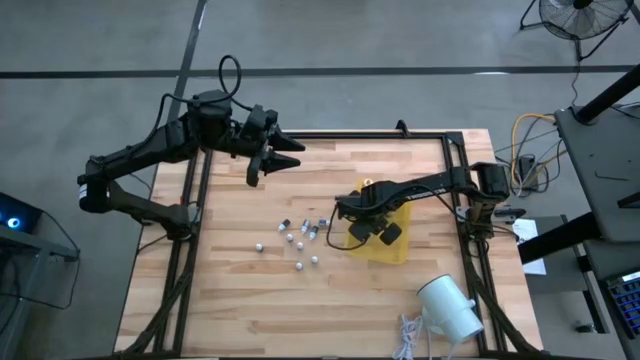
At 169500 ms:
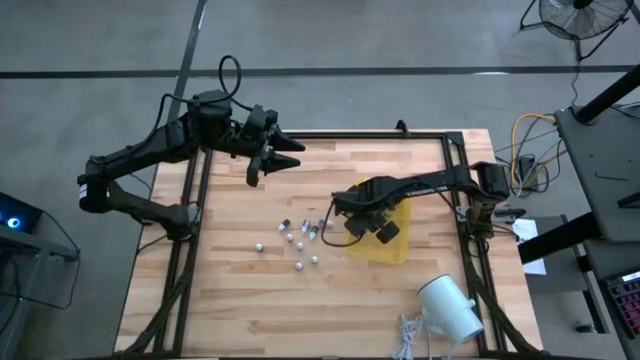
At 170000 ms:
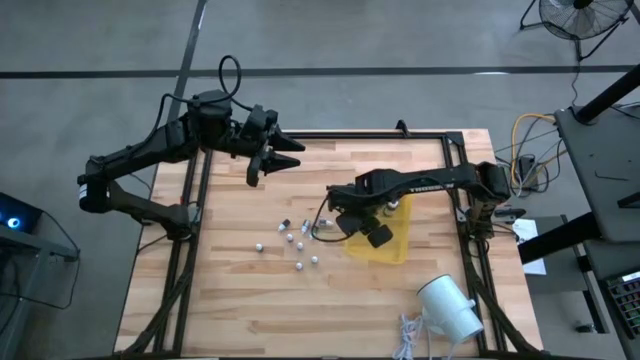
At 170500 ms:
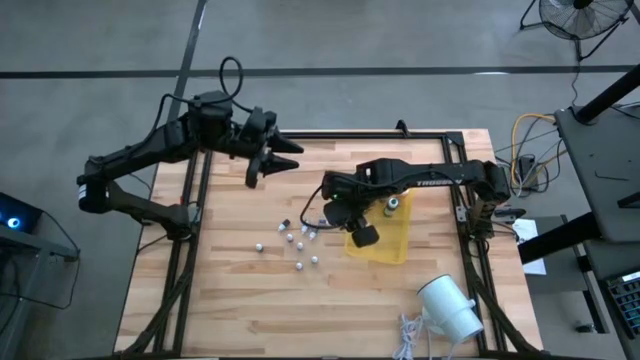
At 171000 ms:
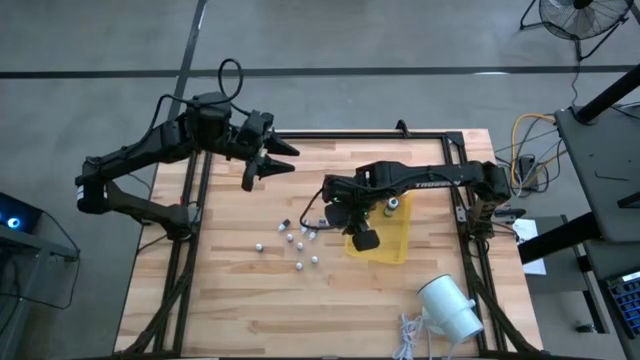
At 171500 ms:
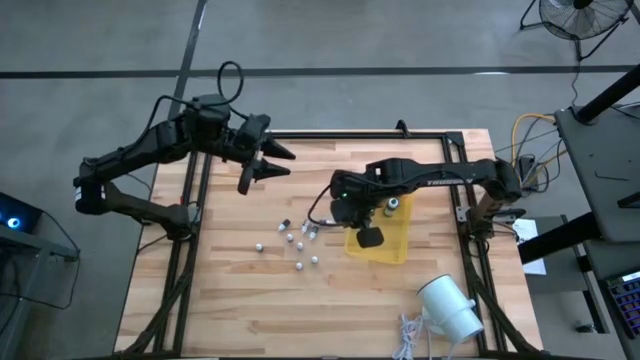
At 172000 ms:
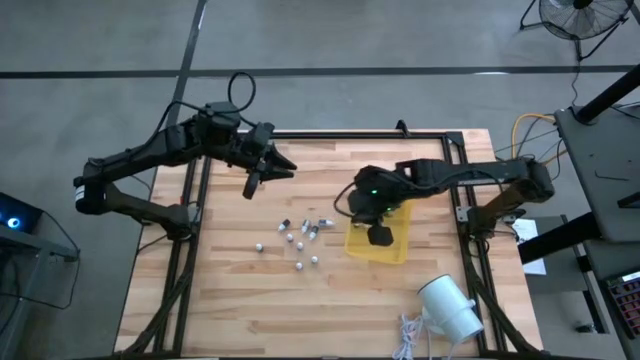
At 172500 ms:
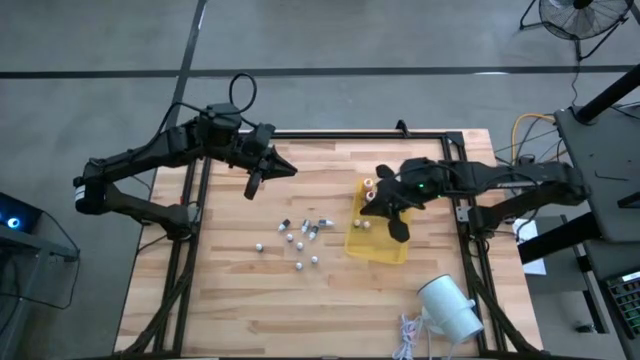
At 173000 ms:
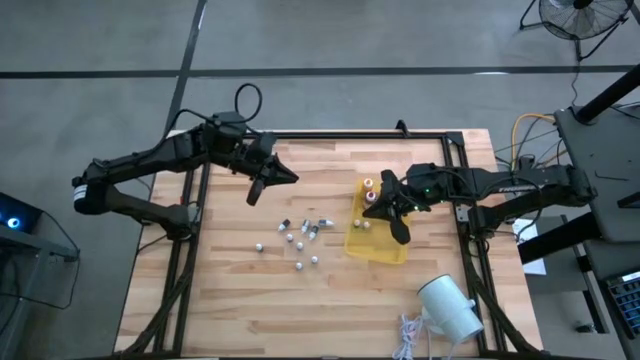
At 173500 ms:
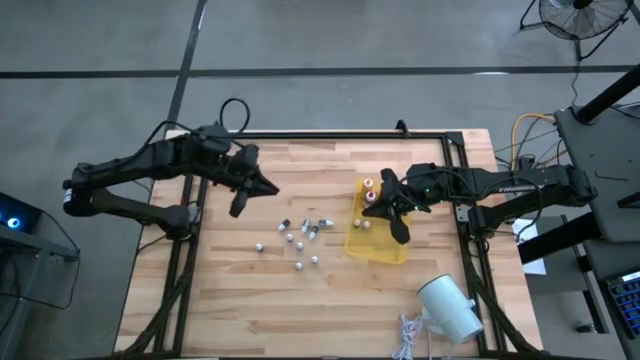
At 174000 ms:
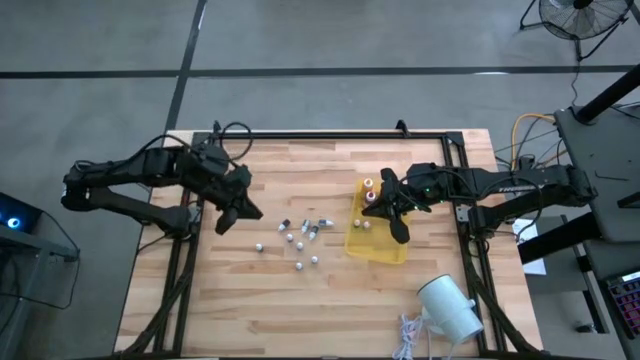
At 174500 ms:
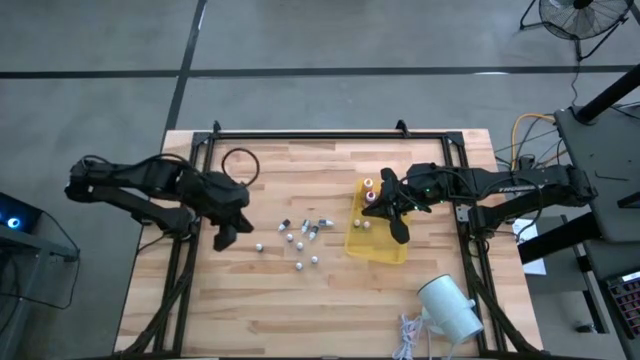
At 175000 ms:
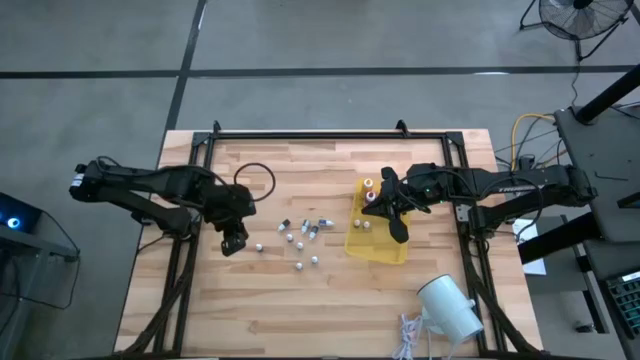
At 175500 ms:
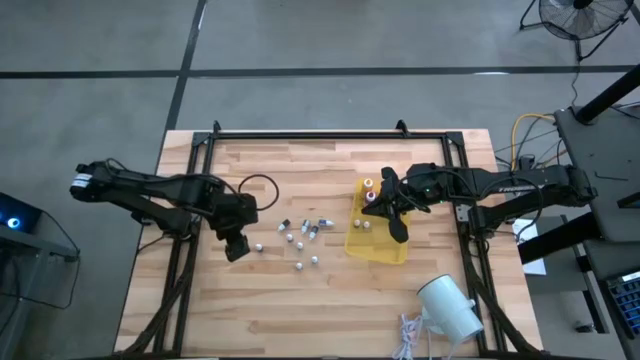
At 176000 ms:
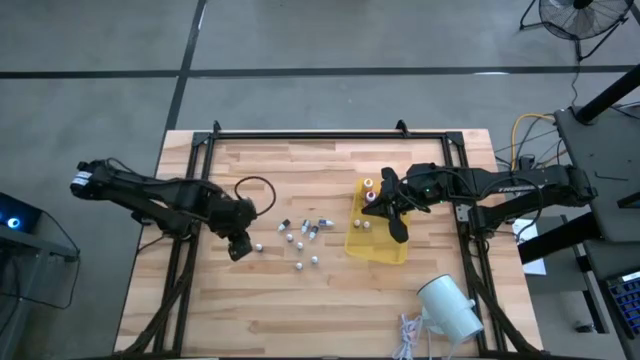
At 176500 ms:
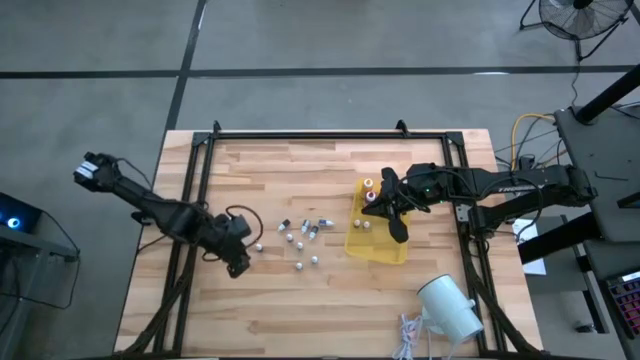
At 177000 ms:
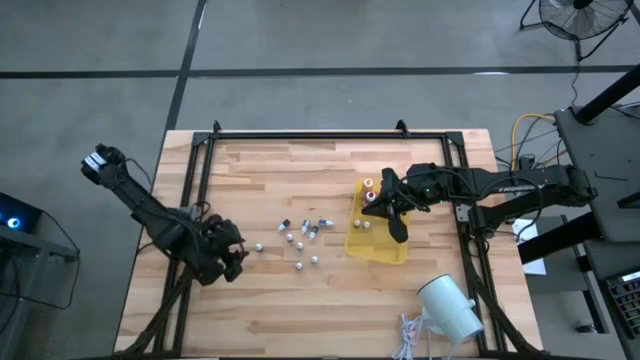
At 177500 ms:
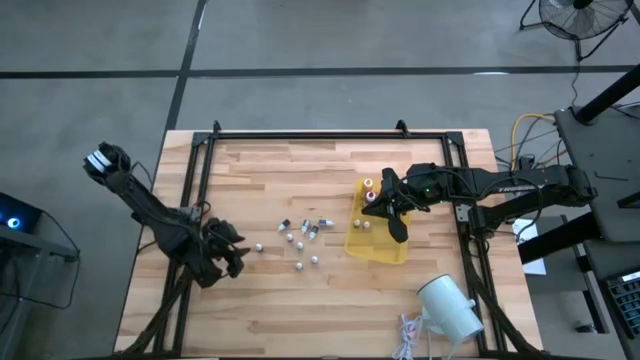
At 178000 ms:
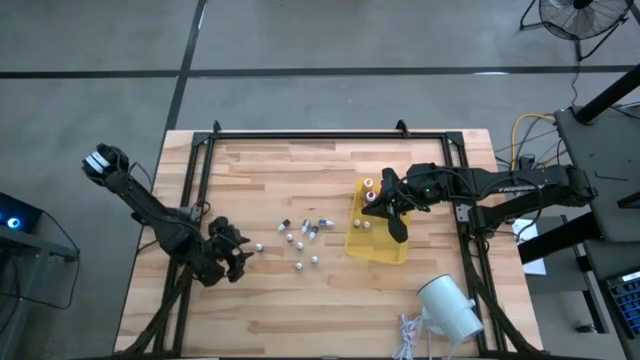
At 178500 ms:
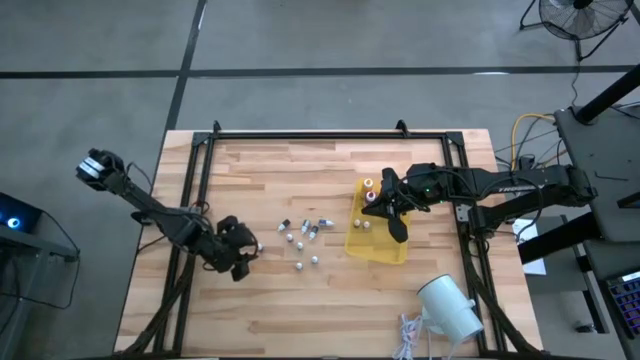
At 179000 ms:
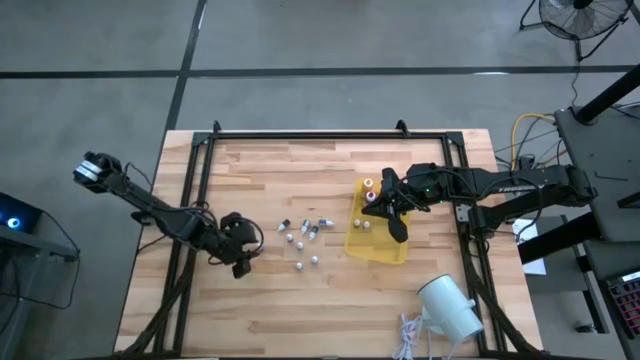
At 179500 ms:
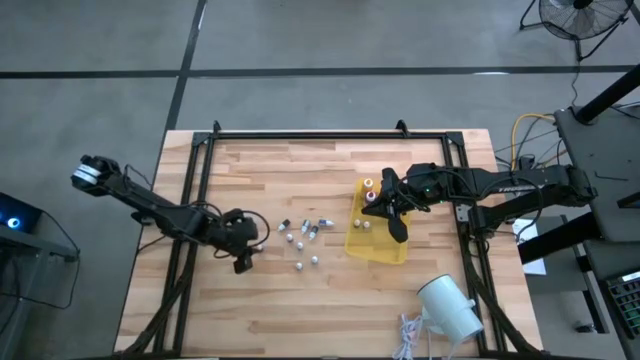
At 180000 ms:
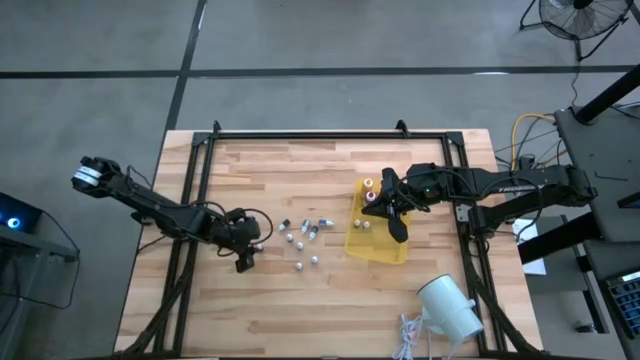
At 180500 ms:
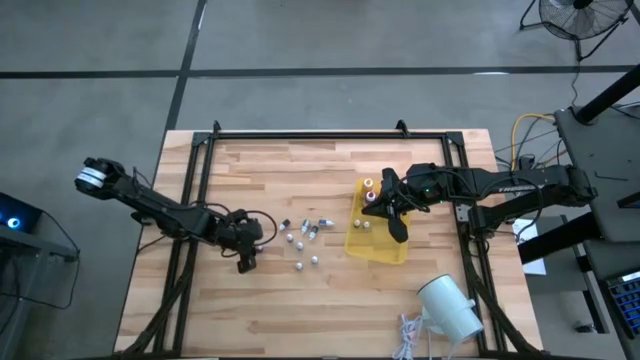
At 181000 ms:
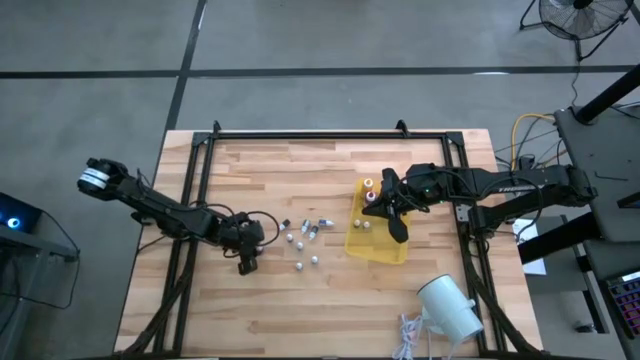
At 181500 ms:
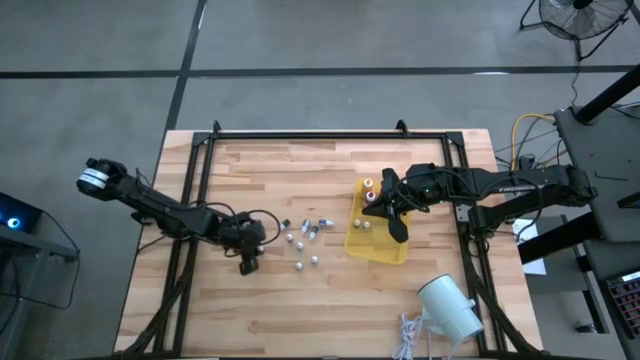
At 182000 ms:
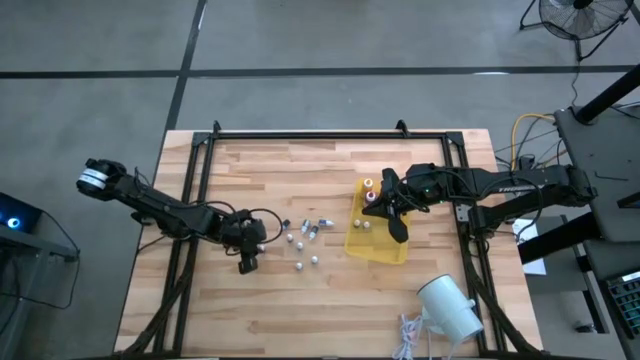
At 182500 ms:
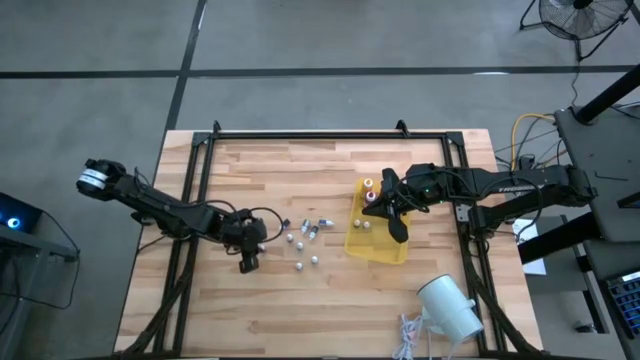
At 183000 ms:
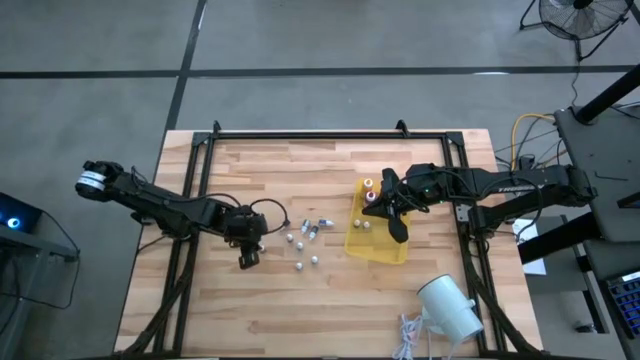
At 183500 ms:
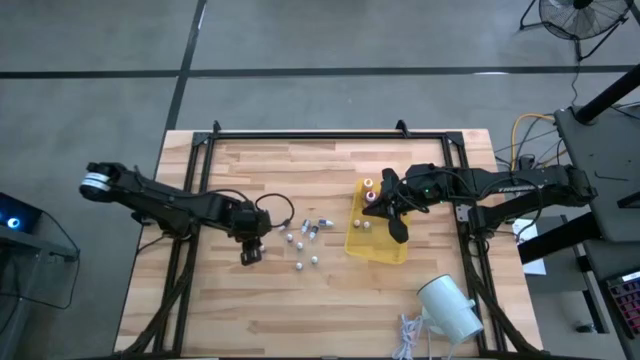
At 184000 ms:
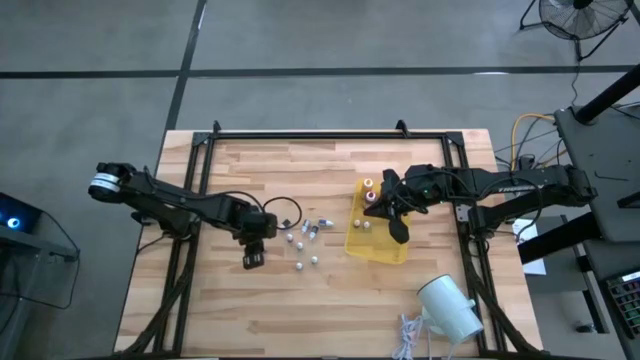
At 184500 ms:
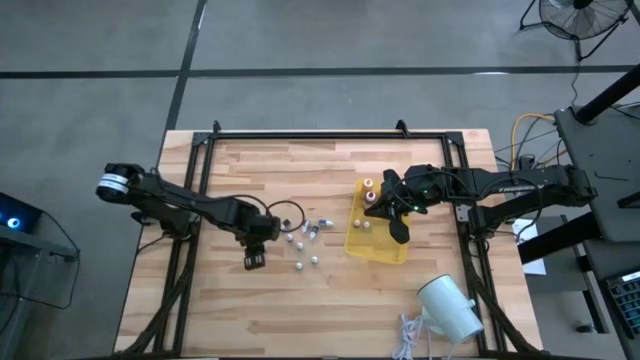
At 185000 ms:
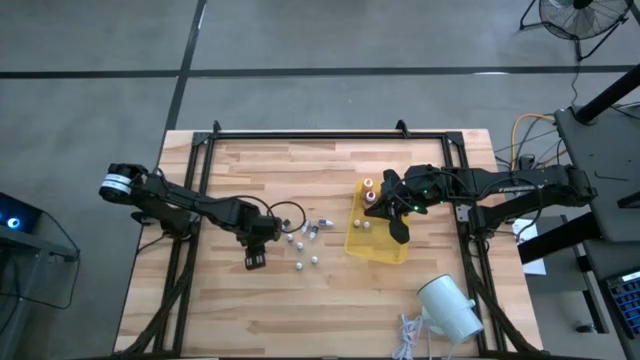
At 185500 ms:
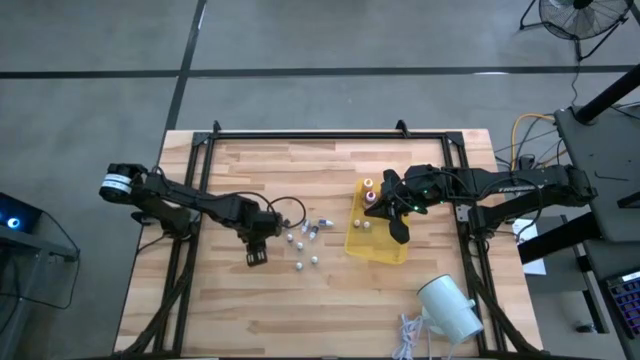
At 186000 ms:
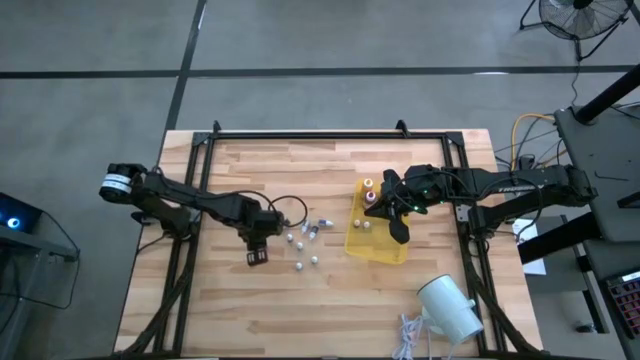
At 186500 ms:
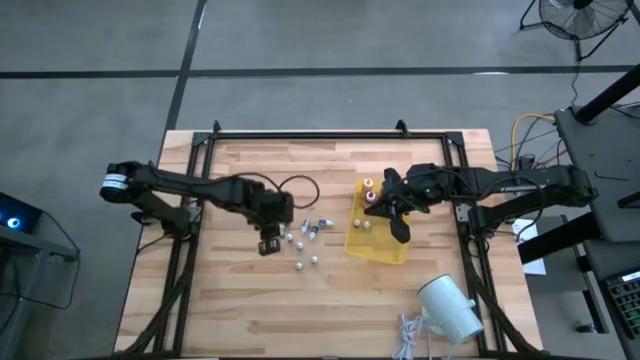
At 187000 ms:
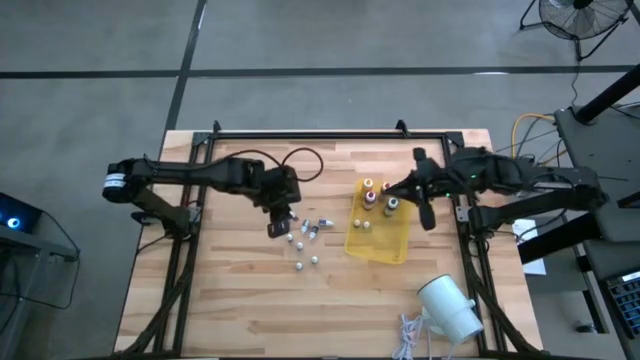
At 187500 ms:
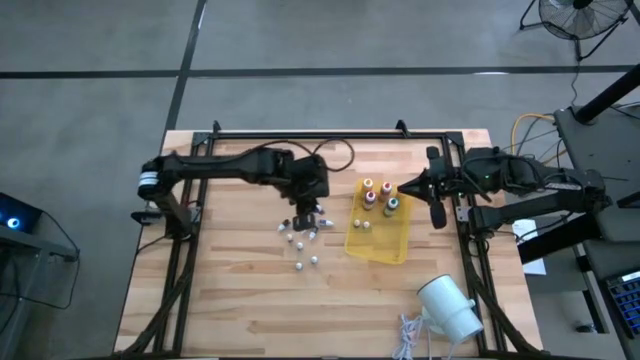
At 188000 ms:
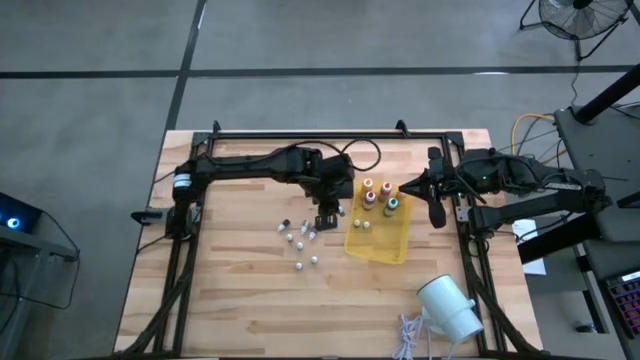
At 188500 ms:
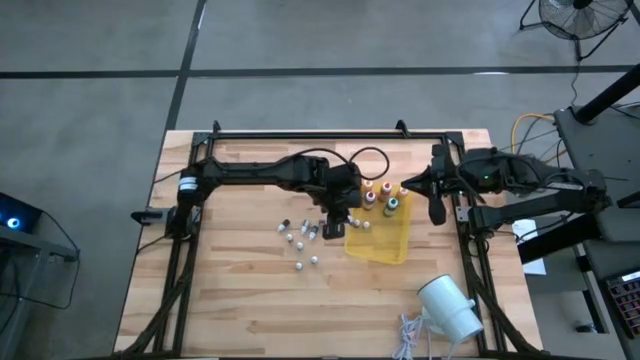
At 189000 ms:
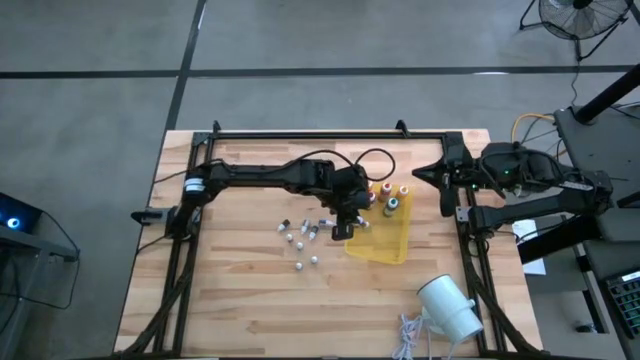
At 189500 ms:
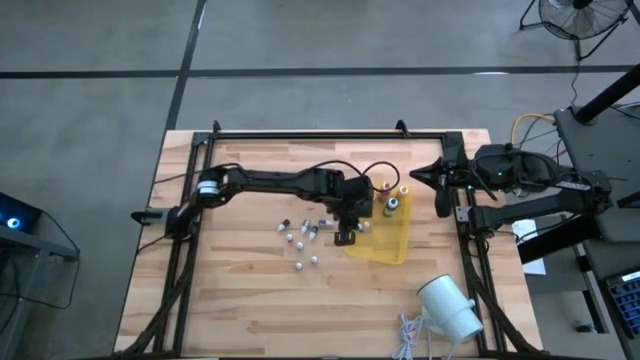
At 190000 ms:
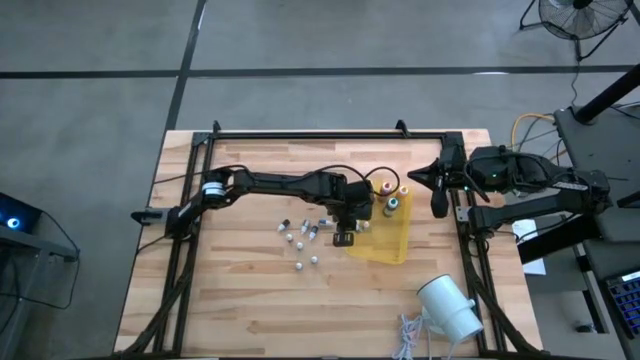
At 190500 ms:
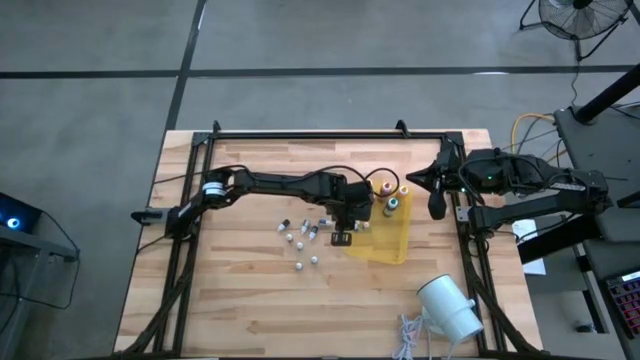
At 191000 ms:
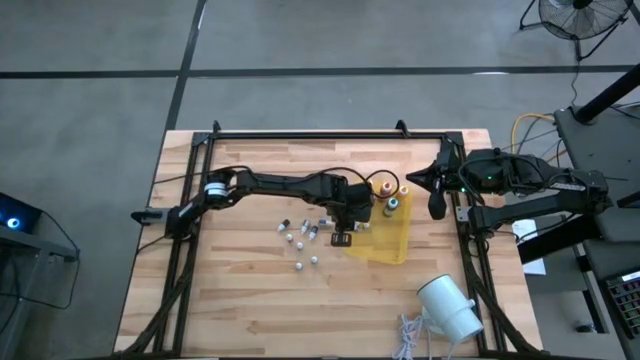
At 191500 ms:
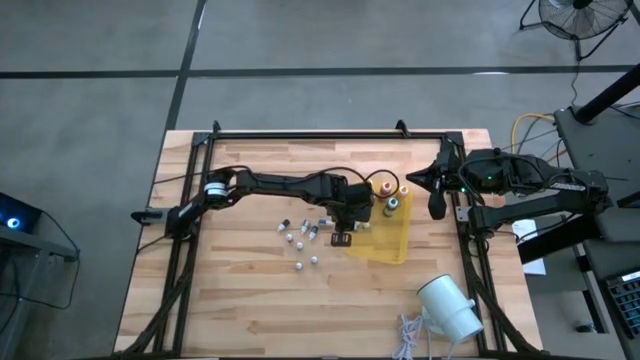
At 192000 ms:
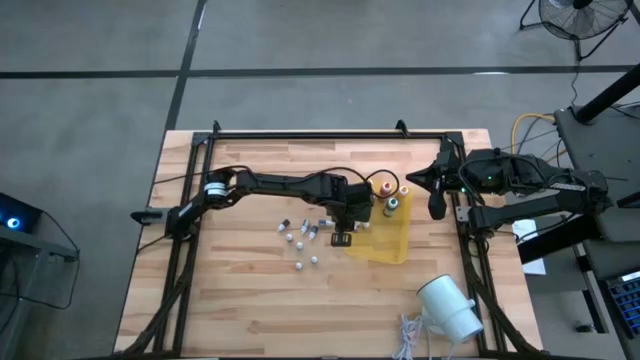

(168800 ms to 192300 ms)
Task: Pick & Place food coloring
Put the small violet food coloring bottle into the yellow bin
